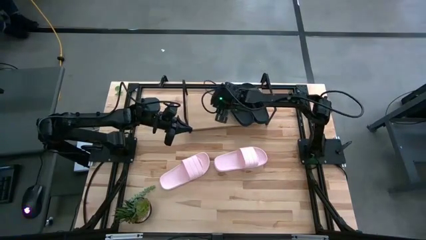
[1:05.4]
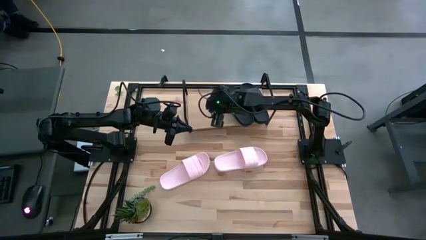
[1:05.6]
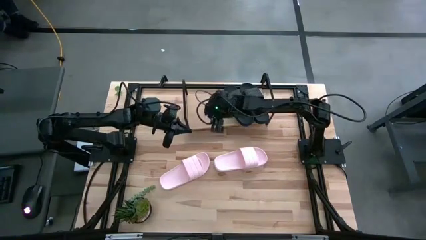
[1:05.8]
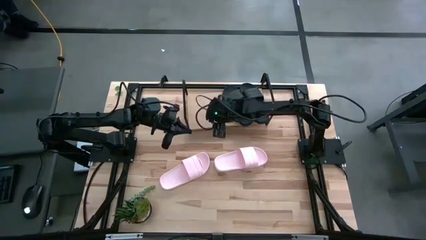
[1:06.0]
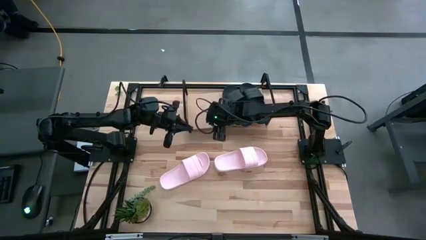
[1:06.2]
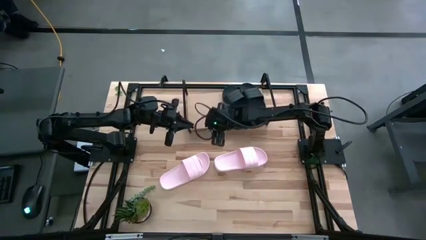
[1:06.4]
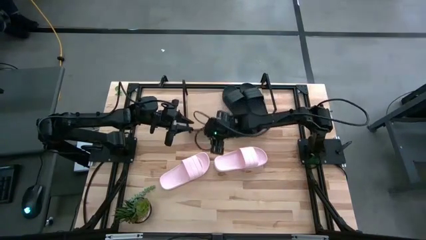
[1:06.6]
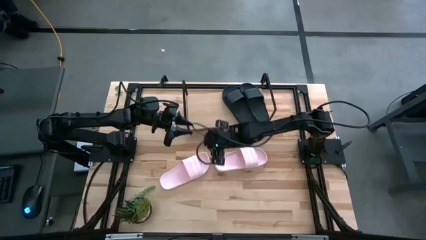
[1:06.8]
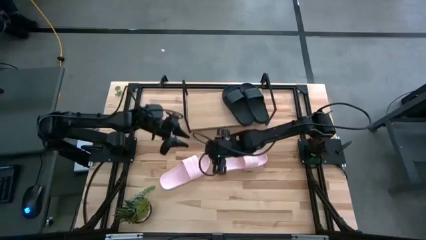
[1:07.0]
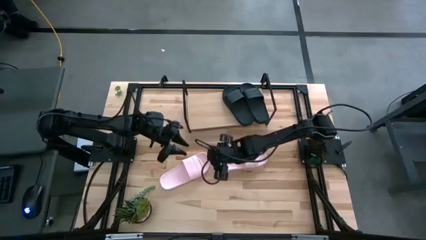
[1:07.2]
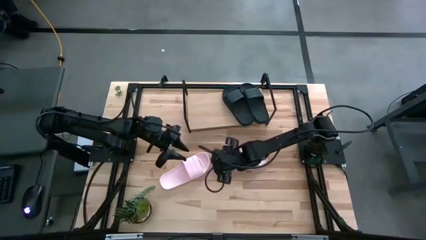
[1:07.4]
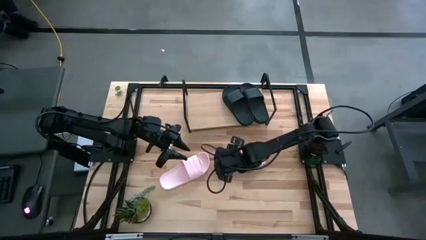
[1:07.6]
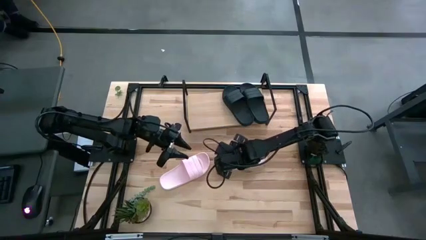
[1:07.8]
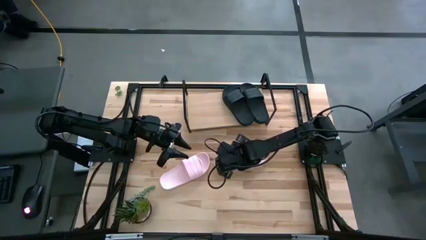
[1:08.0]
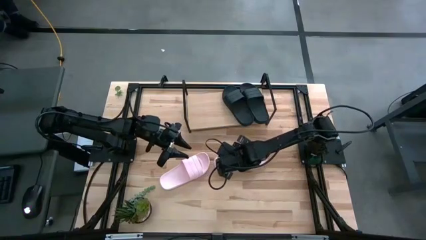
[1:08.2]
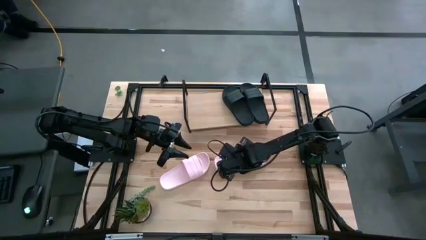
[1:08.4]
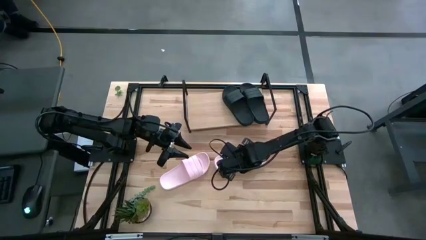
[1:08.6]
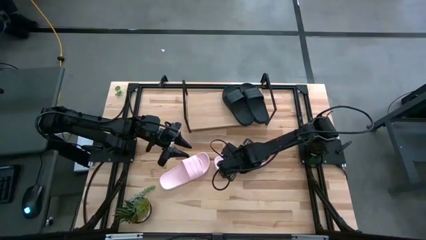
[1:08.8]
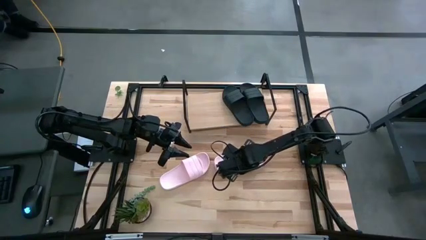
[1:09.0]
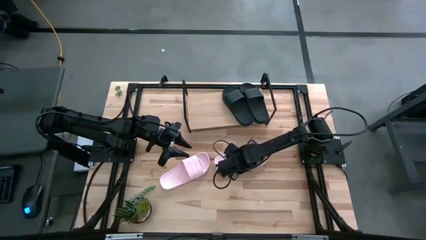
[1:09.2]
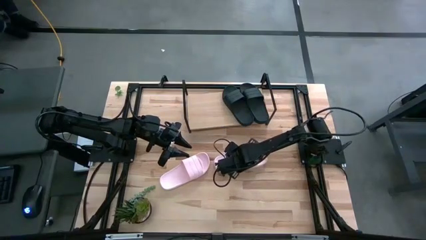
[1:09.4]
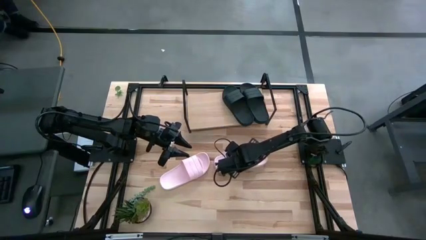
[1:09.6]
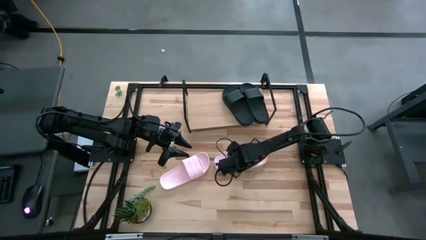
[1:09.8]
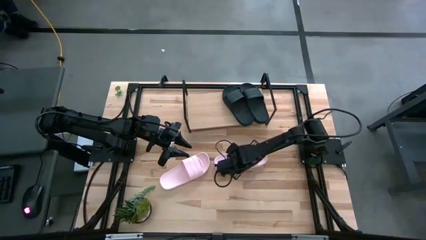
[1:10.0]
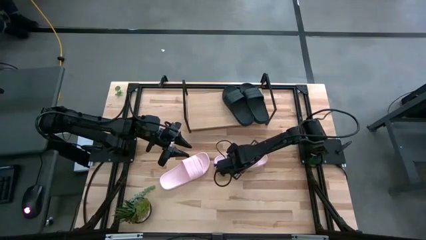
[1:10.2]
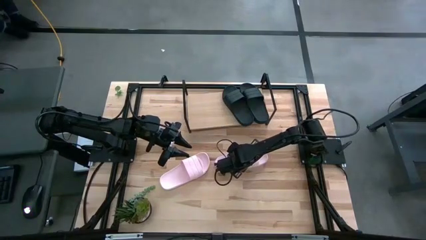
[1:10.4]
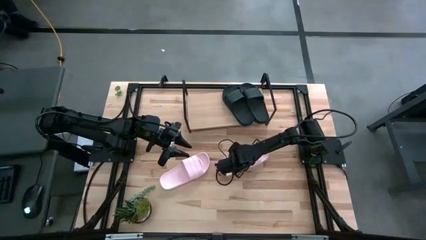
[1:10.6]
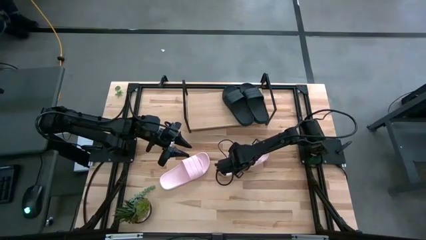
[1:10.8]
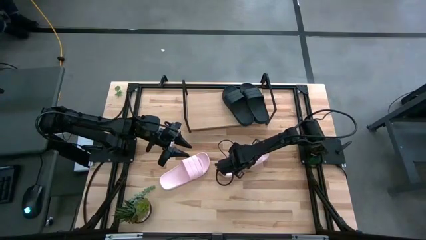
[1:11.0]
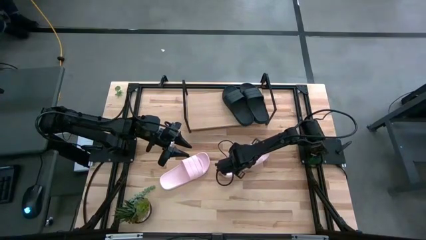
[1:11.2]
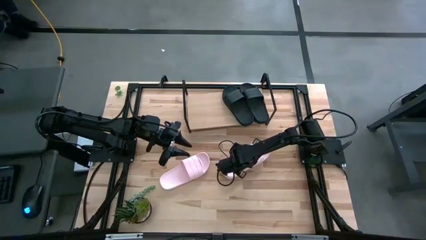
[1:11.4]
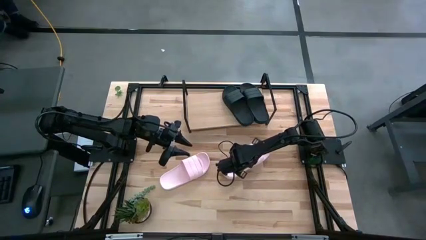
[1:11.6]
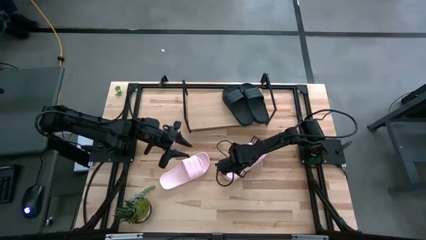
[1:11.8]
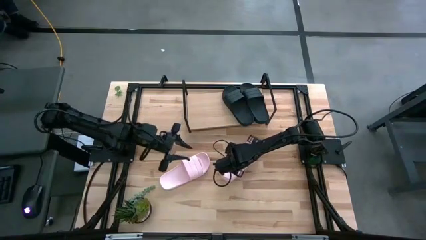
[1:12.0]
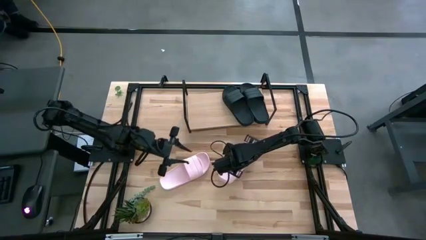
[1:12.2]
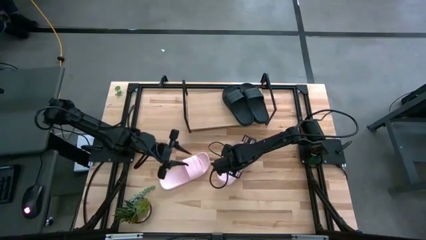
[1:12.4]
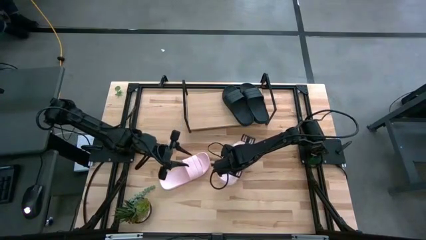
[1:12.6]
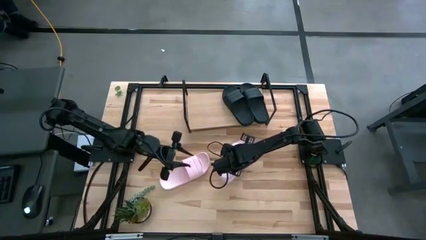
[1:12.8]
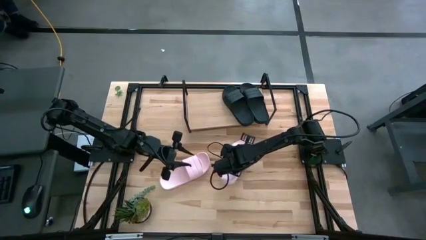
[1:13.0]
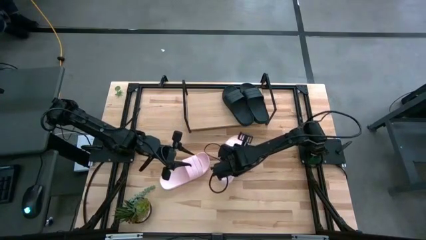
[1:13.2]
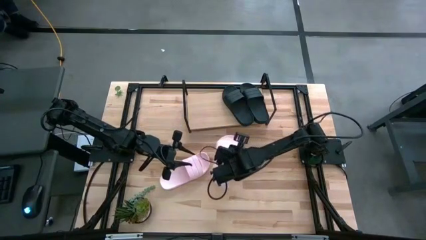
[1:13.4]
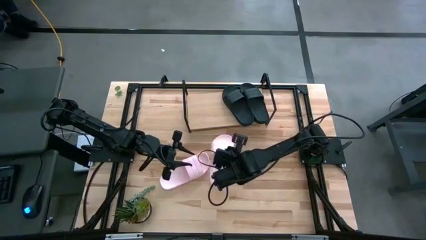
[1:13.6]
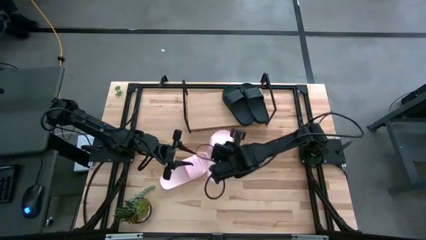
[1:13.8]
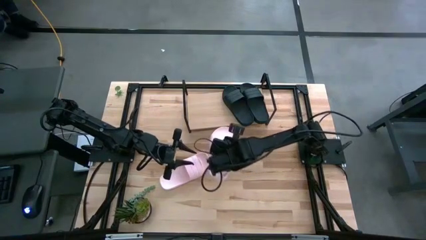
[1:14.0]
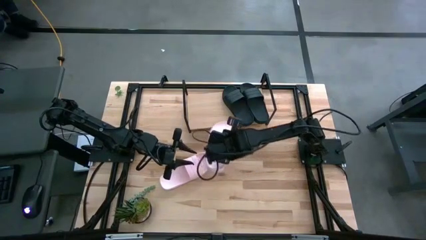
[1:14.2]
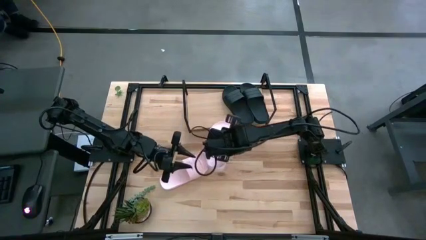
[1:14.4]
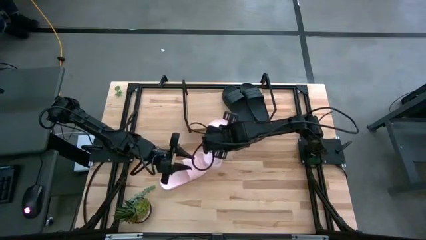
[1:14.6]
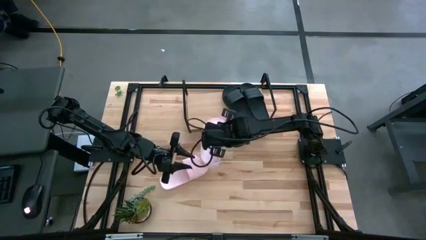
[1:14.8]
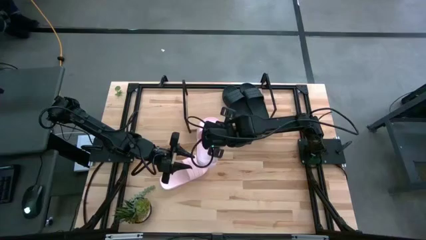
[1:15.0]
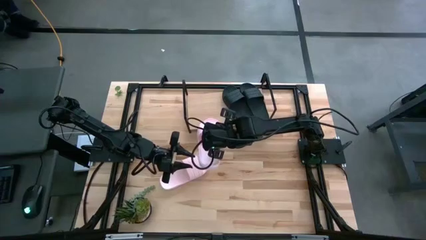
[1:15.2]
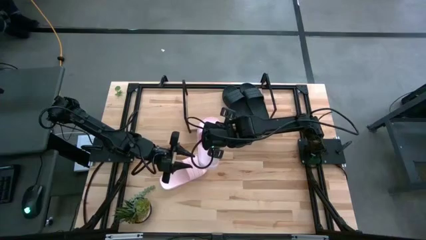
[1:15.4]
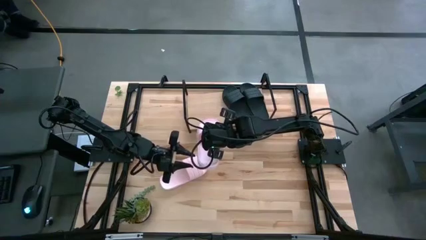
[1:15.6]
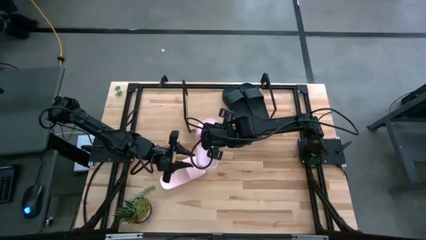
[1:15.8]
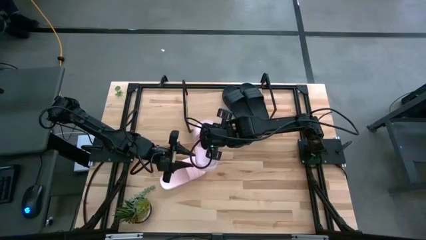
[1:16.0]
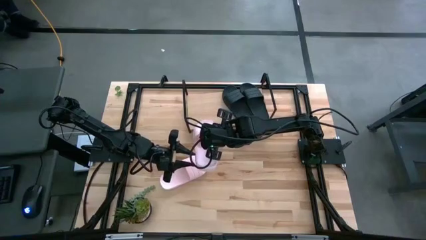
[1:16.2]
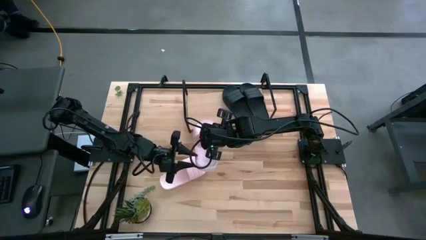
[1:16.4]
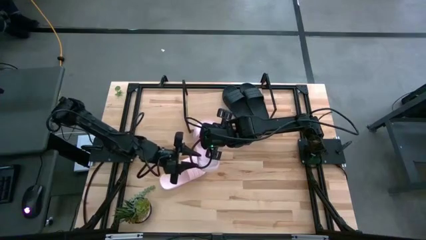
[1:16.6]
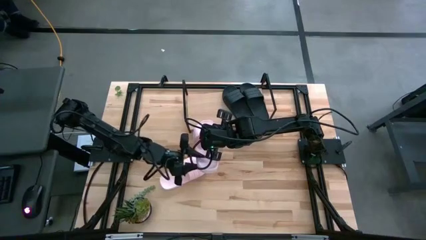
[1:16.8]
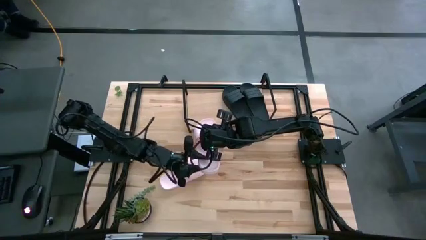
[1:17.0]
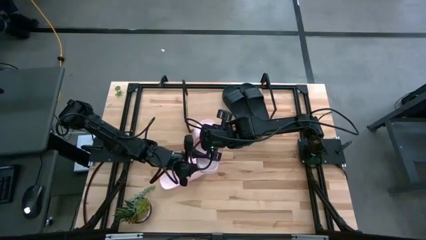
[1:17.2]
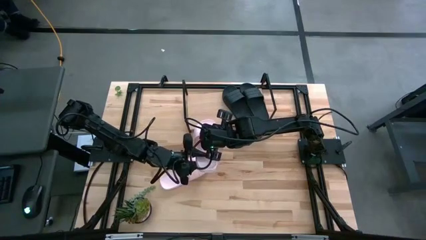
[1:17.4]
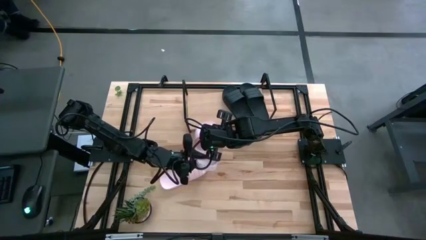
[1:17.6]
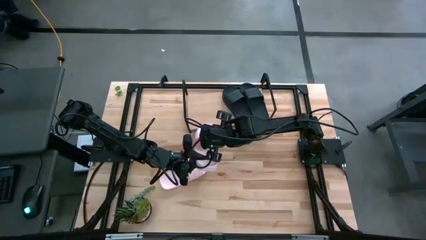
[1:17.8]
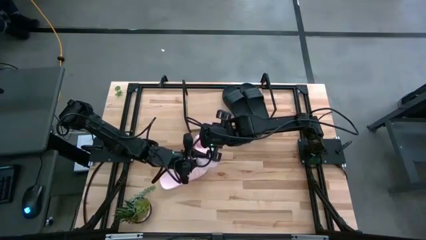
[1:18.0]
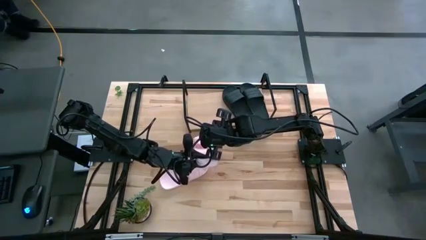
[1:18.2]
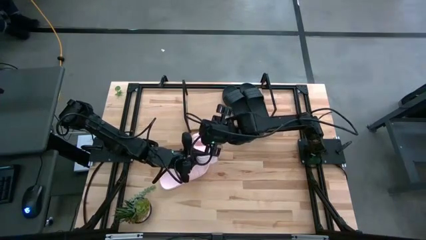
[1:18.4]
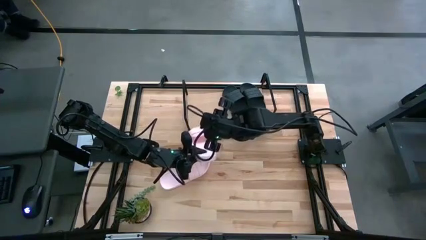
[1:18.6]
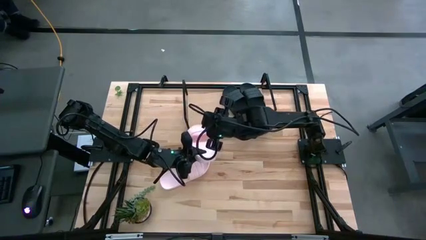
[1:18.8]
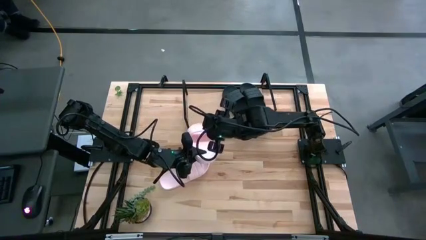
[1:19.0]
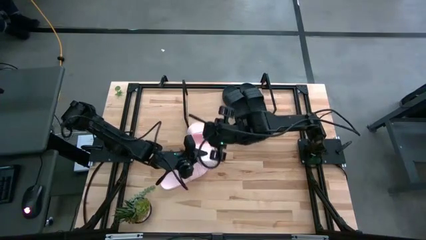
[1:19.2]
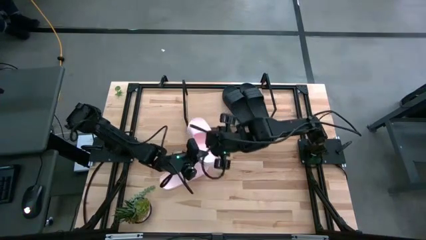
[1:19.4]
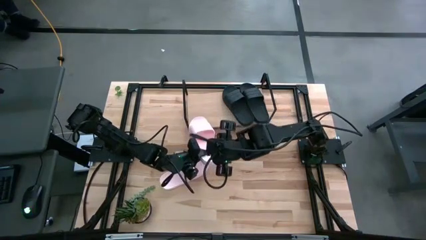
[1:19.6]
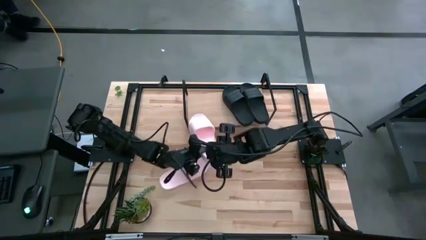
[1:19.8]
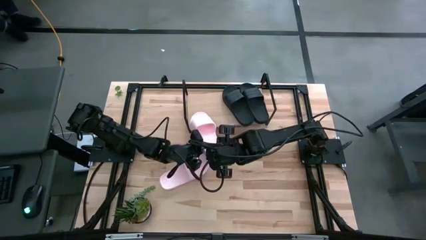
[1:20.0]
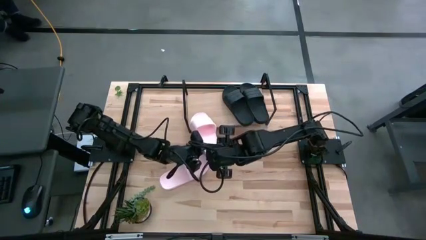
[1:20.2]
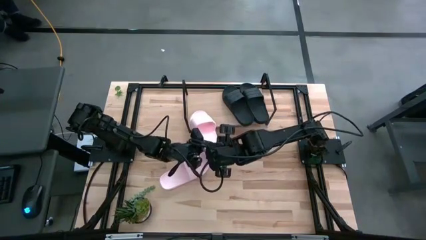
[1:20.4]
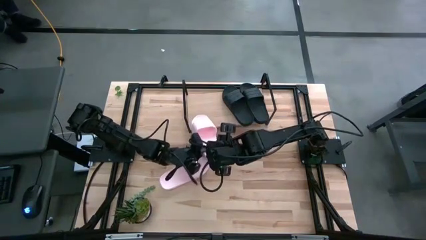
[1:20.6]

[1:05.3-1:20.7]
Task: Pick and place slides into the shelf
Put the right pink slide on the shelf
